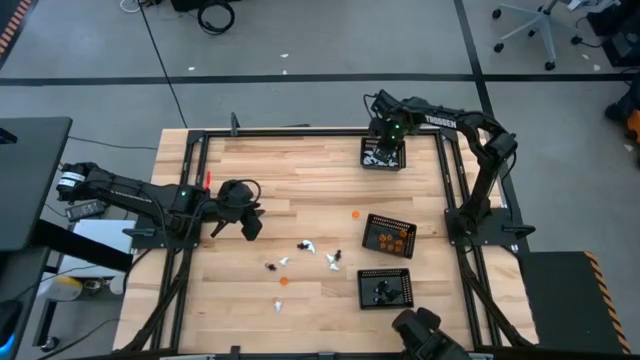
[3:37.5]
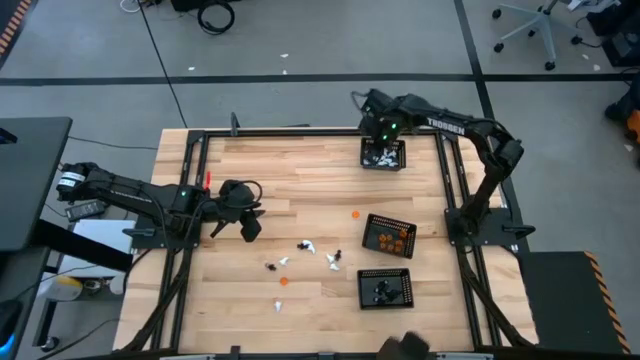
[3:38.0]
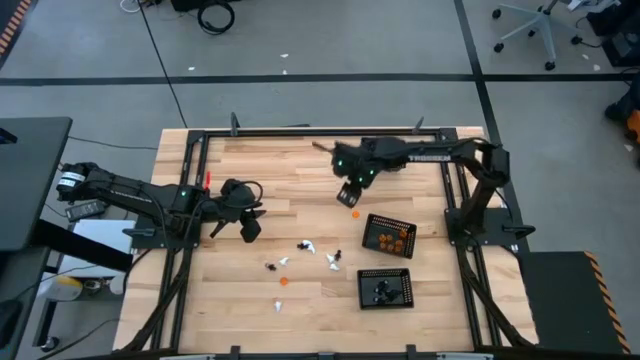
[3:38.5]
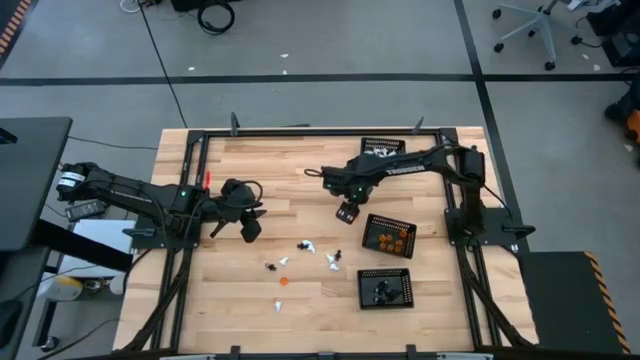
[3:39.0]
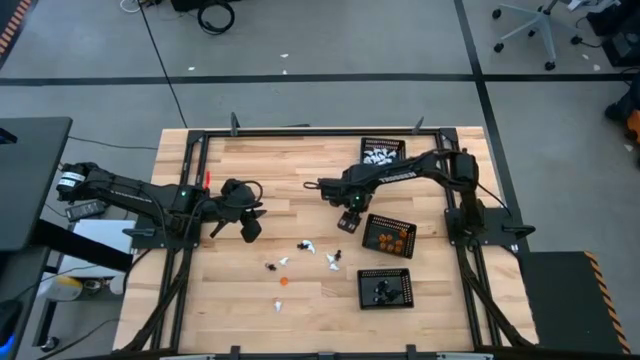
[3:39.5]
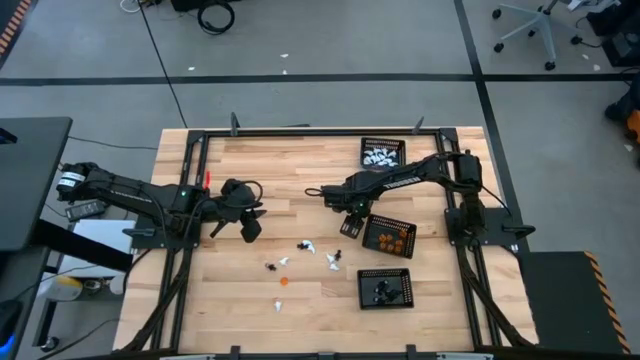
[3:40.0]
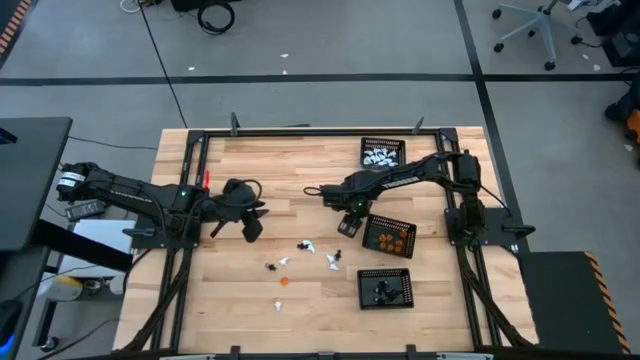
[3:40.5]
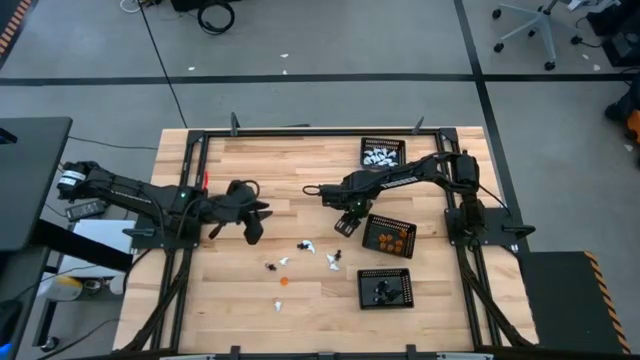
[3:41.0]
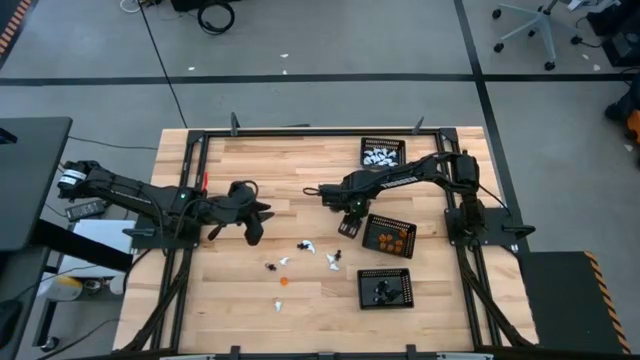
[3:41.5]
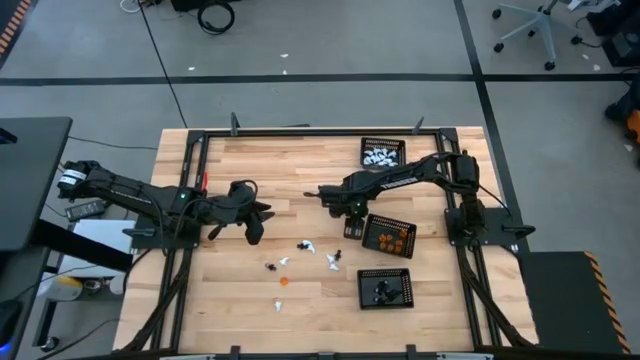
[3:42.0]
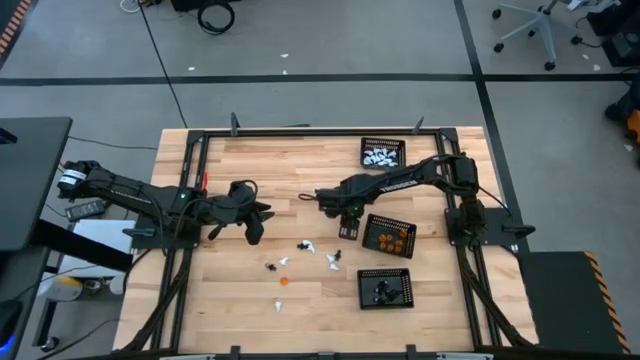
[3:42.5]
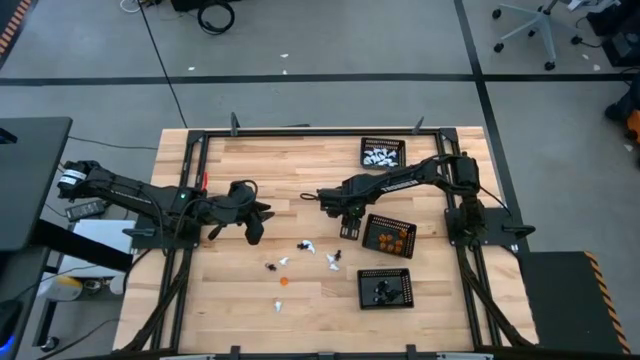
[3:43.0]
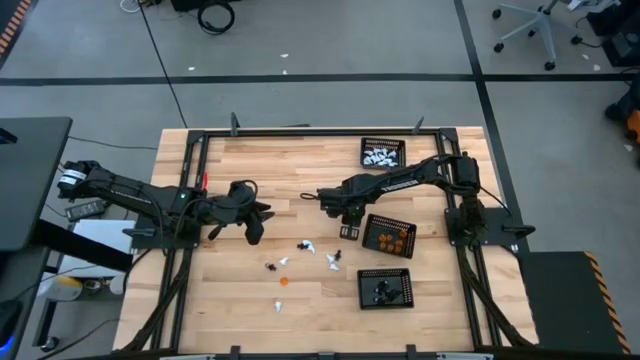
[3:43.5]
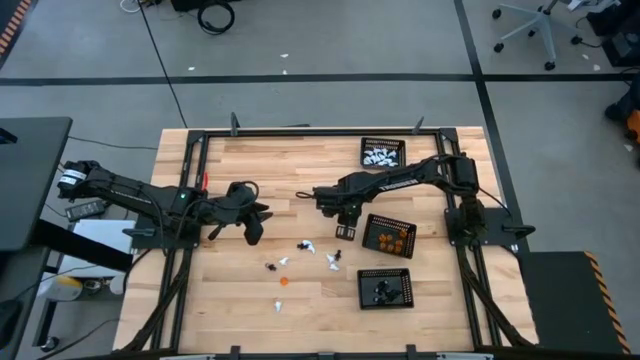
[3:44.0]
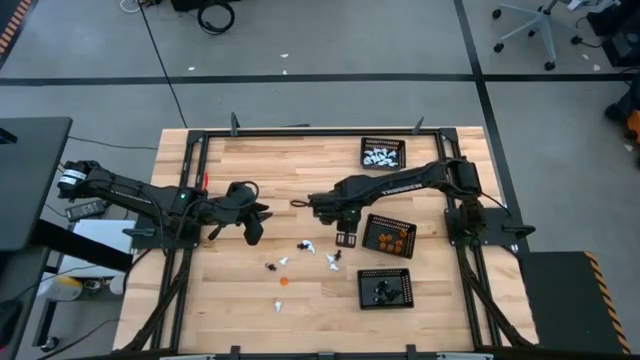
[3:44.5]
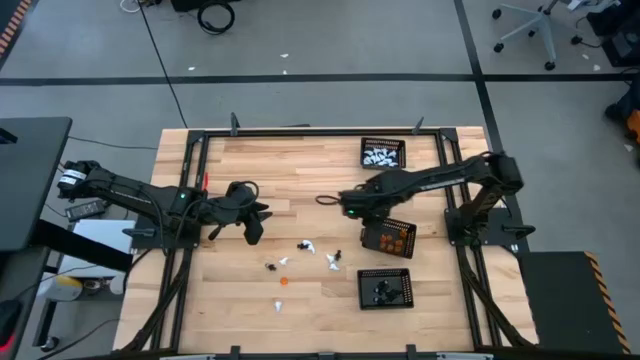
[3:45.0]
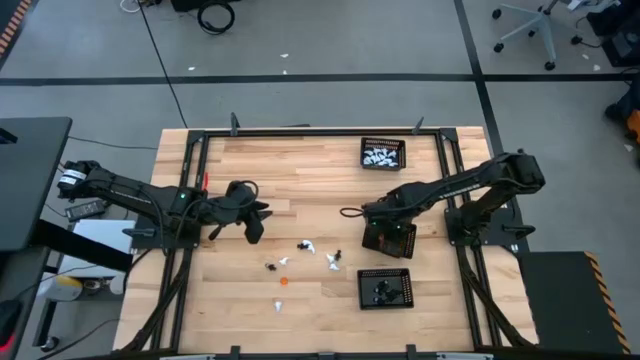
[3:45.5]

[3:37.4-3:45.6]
Task: Sort Halloween decoration
Put the orange pumpkin toy into the center black bin

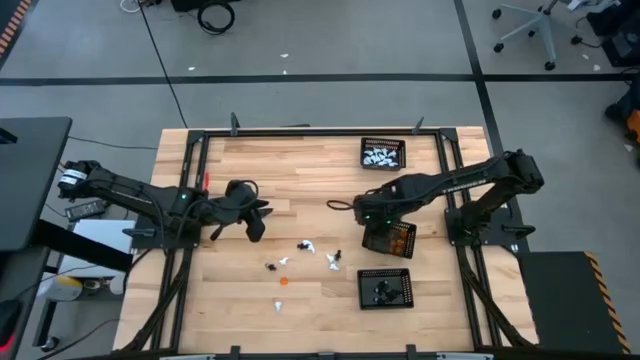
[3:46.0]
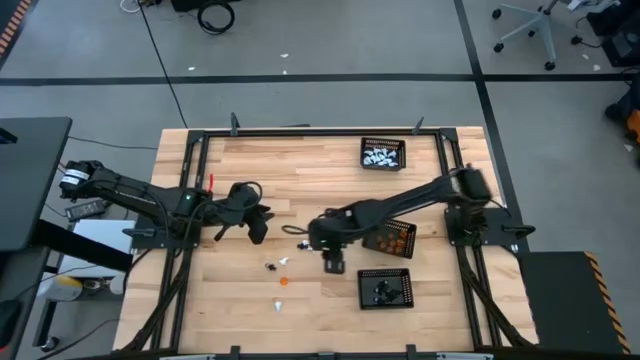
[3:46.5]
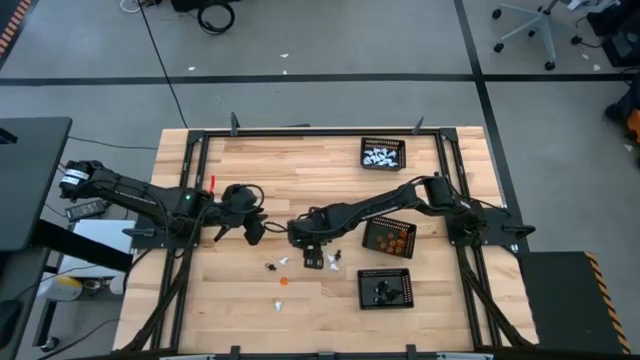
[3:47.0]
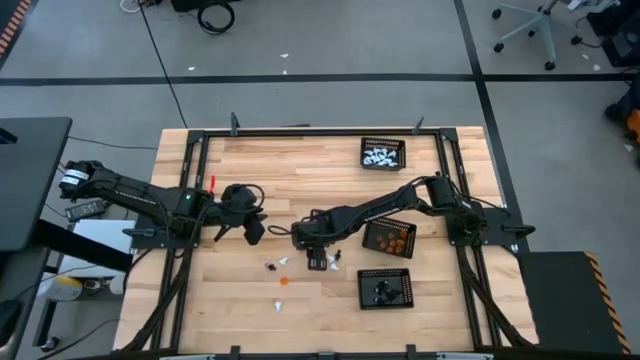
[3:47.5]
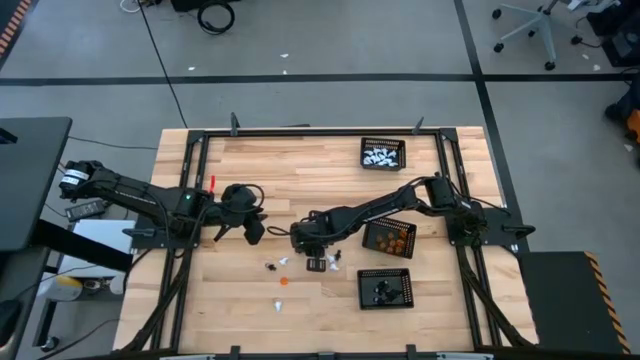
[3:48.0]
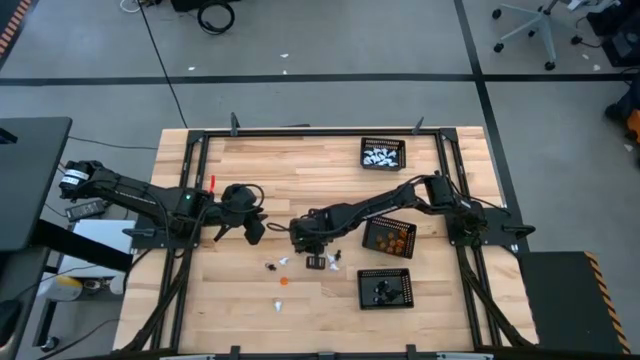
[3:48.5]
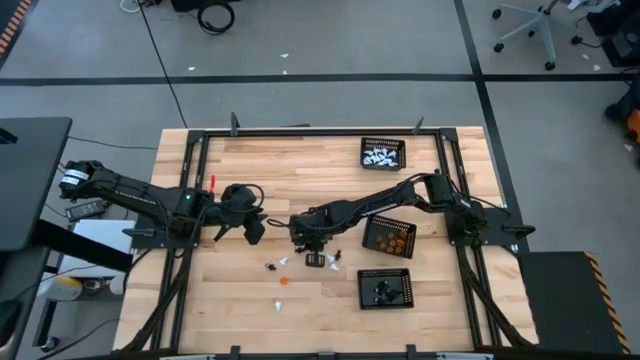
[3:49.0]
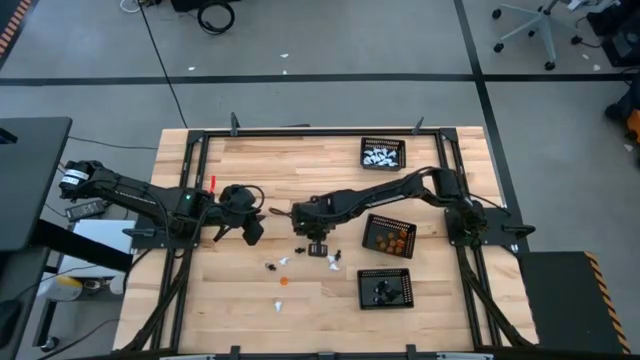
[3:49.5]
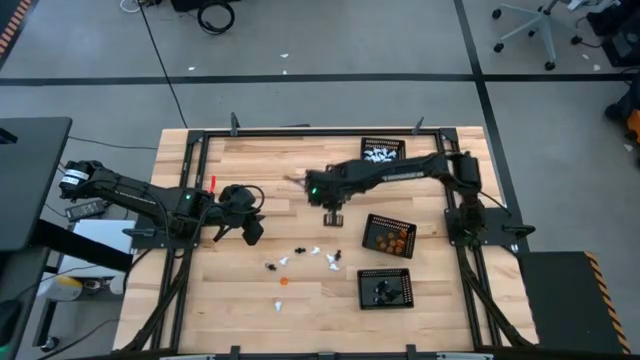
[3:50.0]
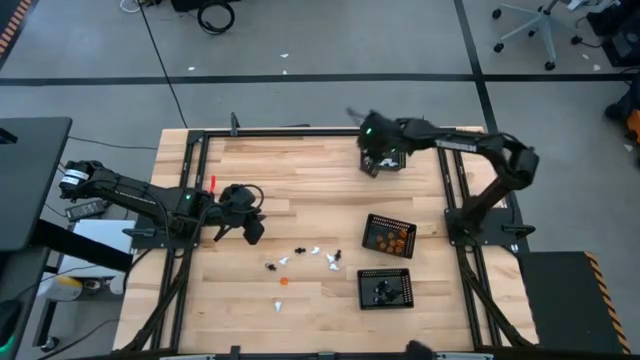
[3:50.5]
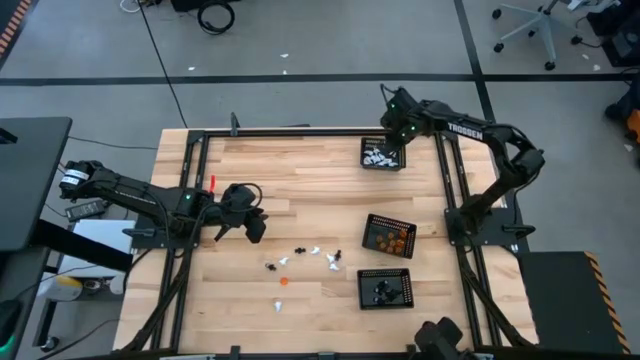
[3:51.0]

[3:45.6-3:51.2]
Put the white ghost toy into the top black bin

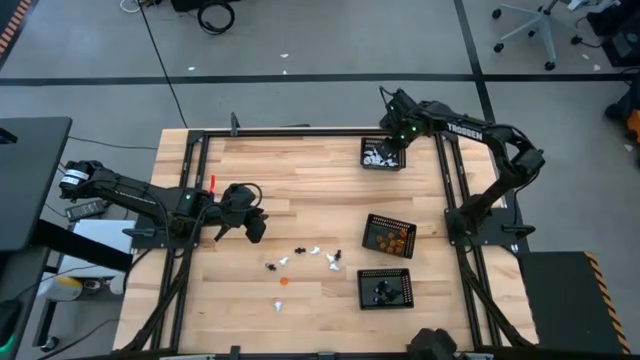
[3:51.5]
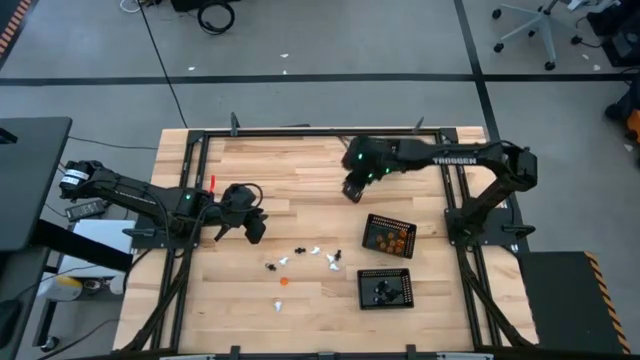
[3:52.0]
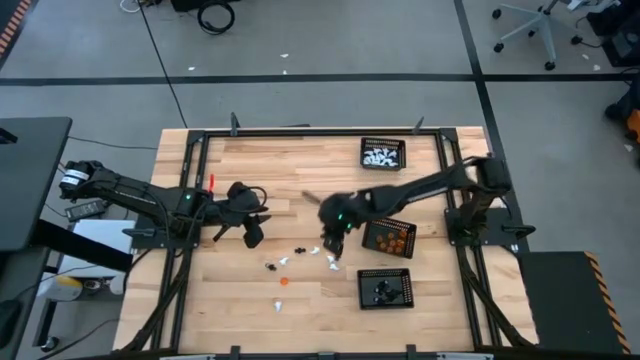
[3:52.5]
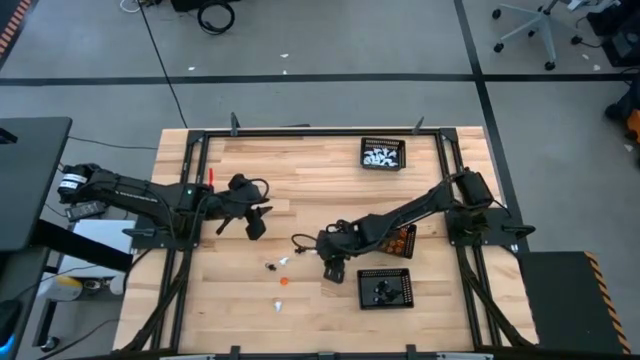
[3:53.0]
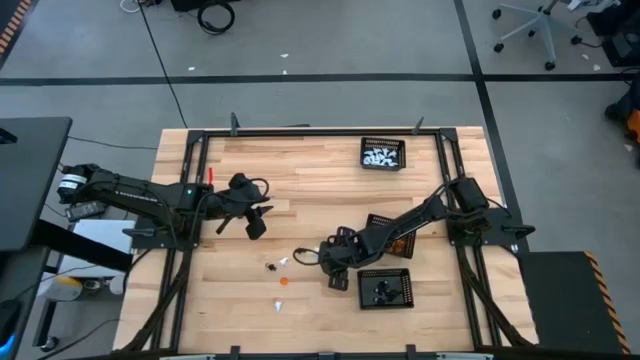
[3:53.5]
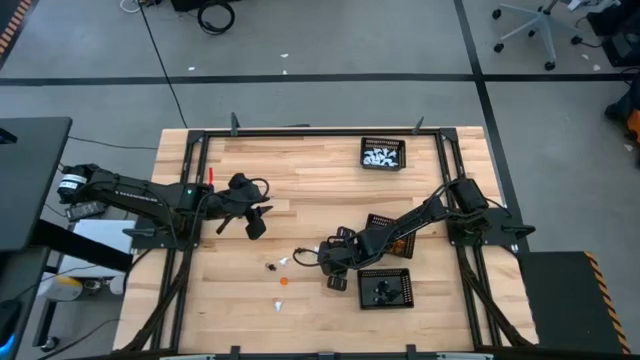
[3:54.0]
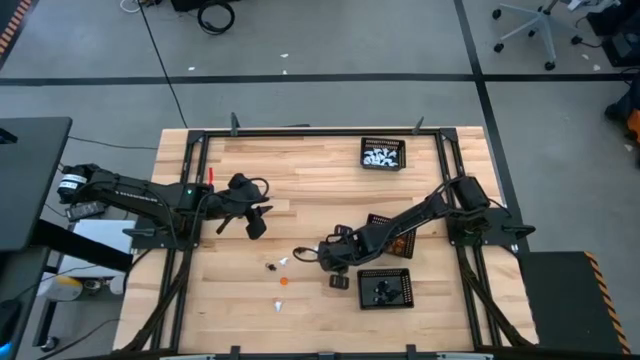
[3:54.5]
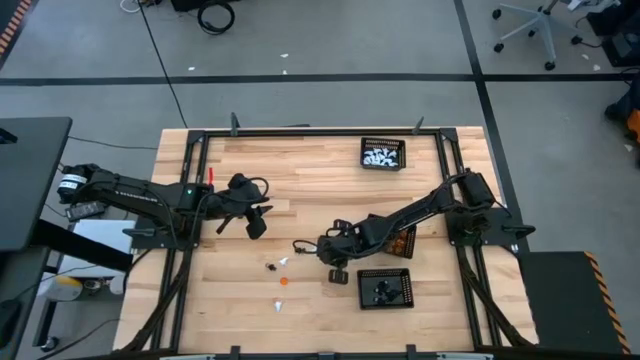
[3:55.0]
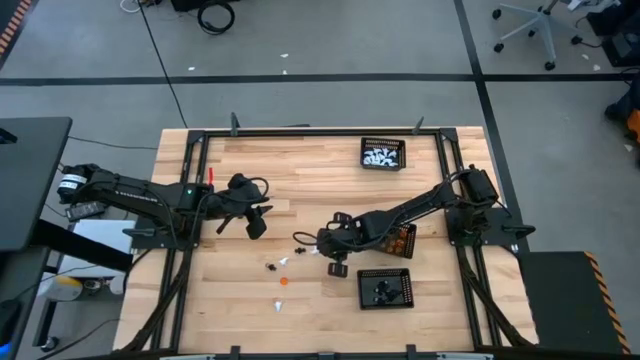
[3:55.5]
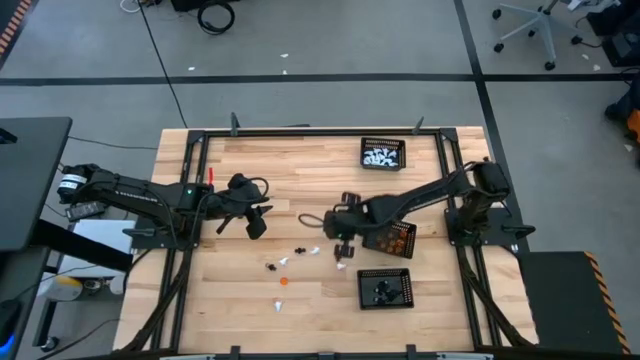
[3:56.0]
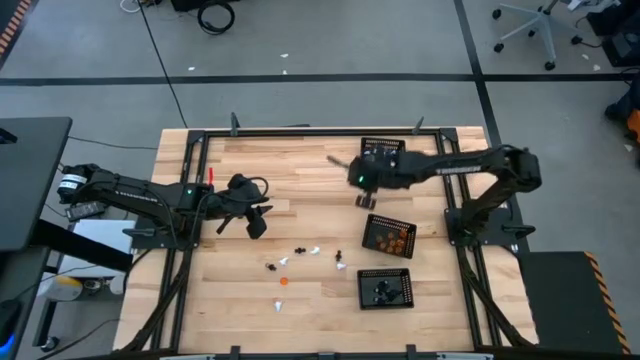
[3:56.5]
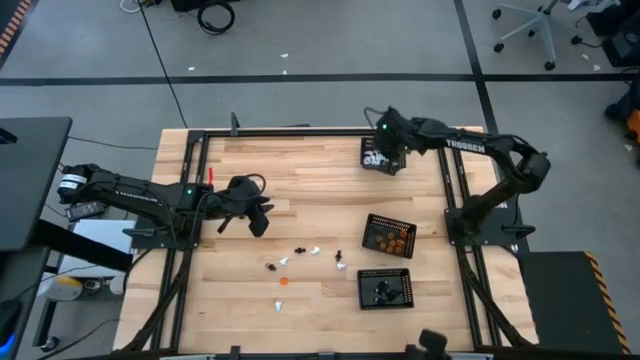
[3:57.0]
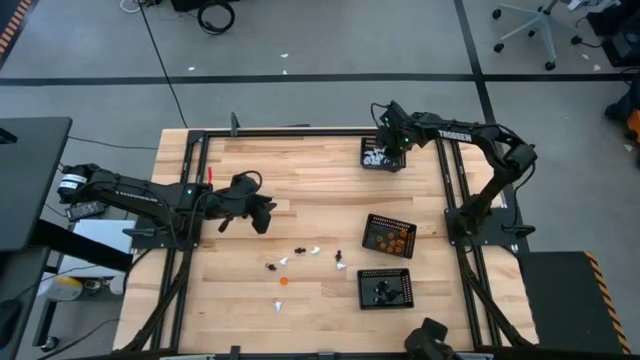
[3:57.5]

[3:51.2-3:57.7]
Put the white ghost toy into the top black bin
